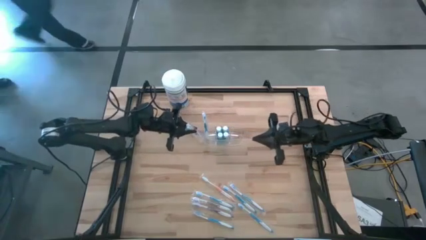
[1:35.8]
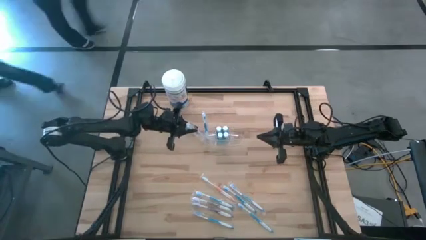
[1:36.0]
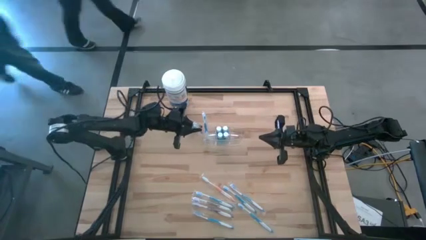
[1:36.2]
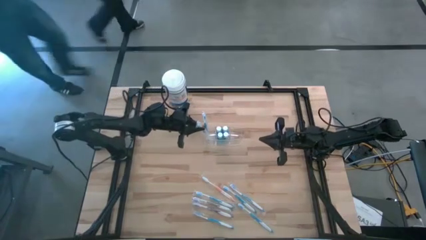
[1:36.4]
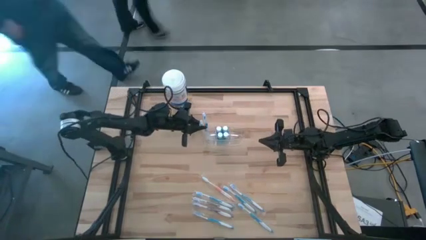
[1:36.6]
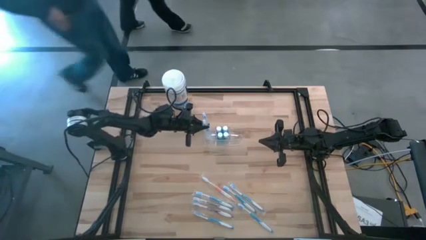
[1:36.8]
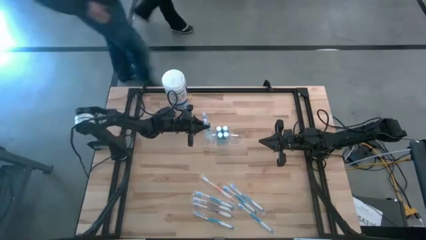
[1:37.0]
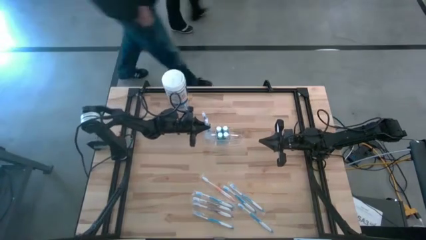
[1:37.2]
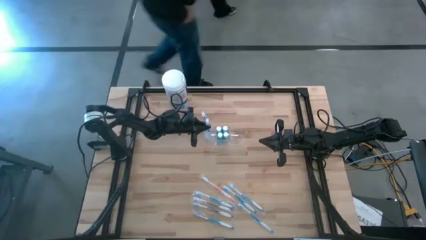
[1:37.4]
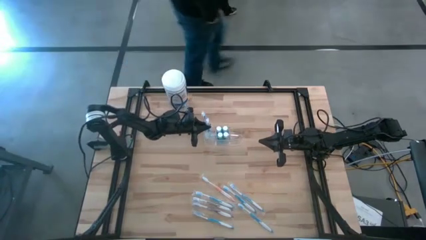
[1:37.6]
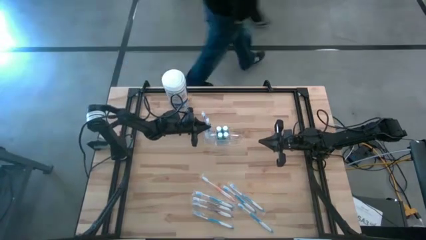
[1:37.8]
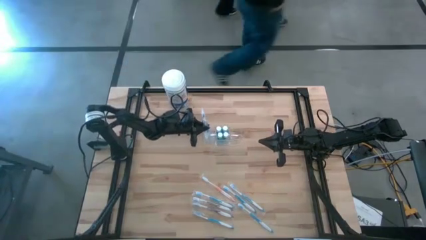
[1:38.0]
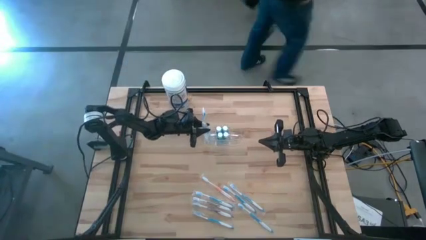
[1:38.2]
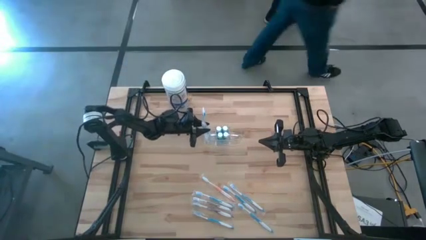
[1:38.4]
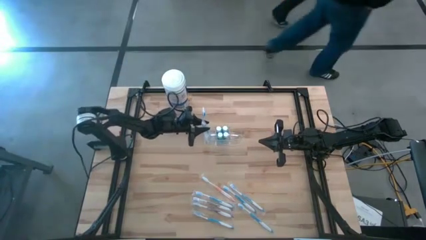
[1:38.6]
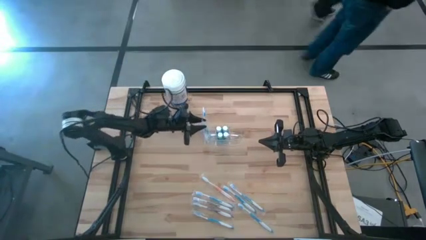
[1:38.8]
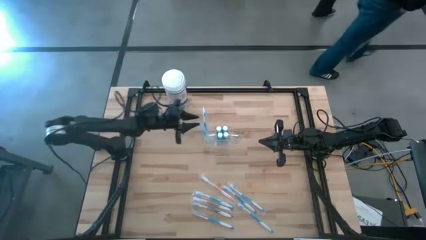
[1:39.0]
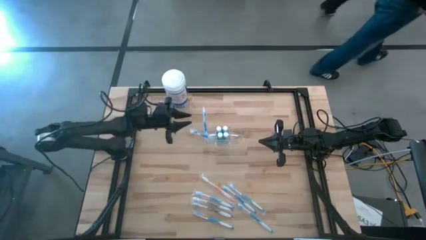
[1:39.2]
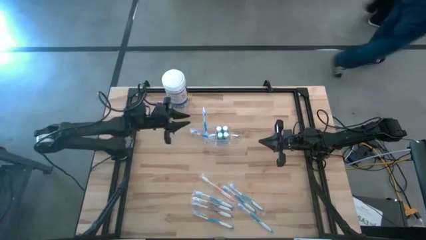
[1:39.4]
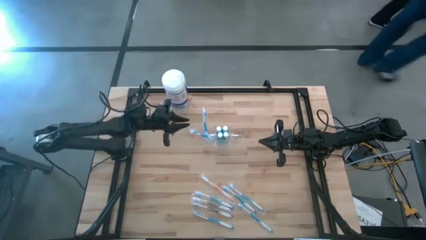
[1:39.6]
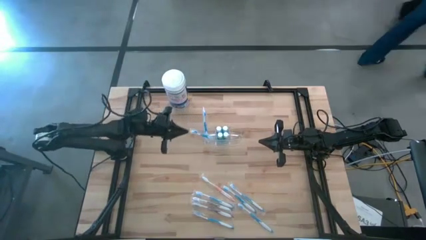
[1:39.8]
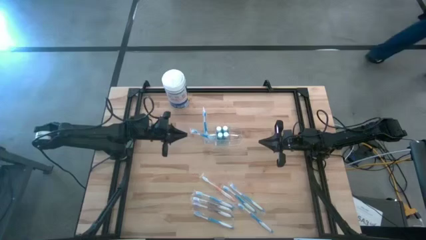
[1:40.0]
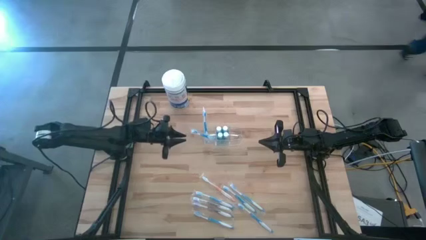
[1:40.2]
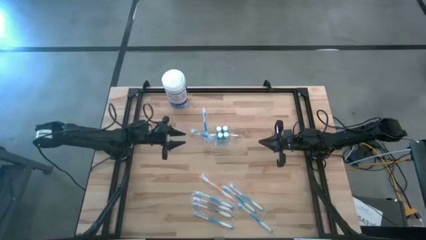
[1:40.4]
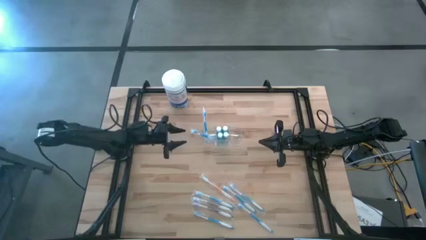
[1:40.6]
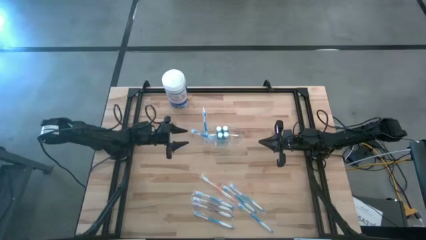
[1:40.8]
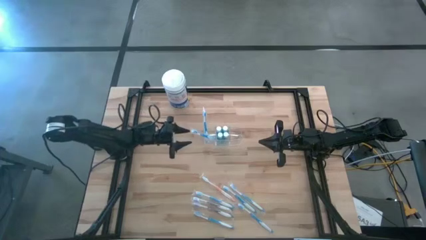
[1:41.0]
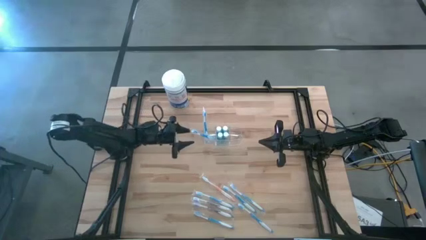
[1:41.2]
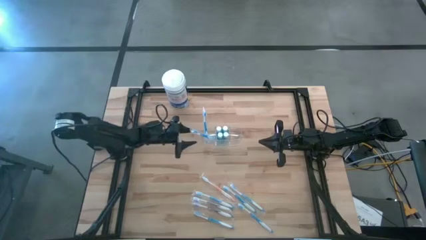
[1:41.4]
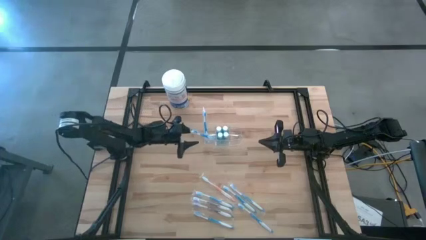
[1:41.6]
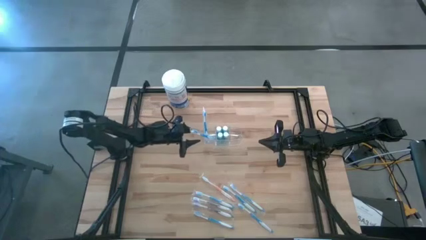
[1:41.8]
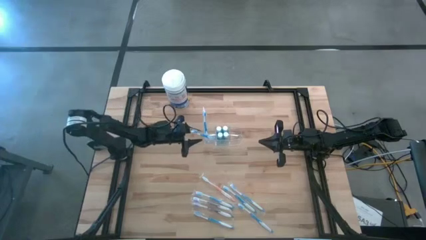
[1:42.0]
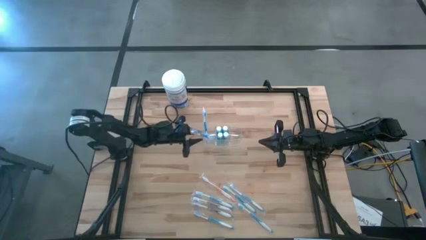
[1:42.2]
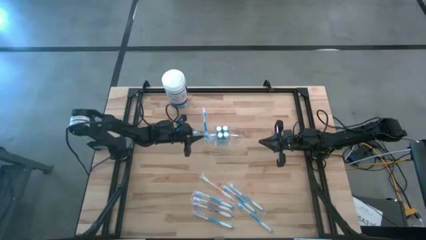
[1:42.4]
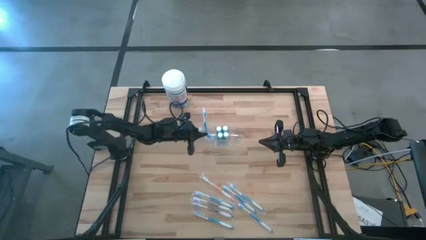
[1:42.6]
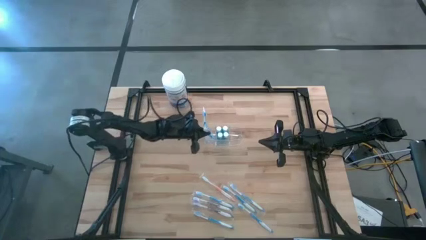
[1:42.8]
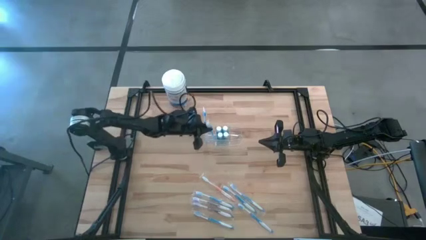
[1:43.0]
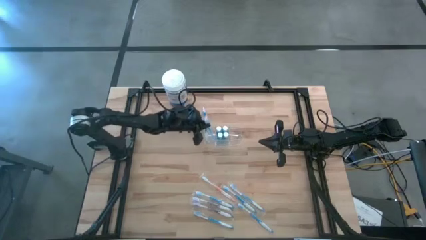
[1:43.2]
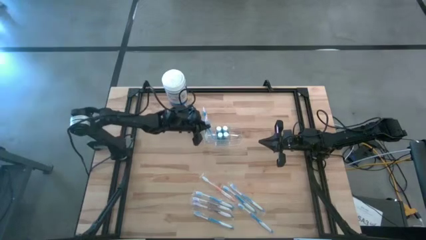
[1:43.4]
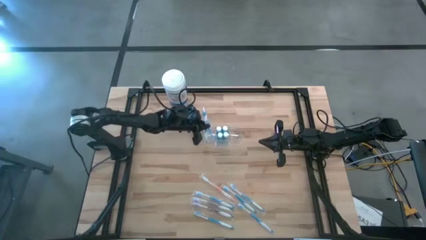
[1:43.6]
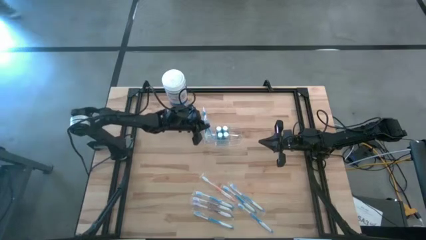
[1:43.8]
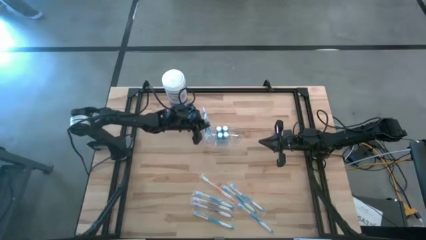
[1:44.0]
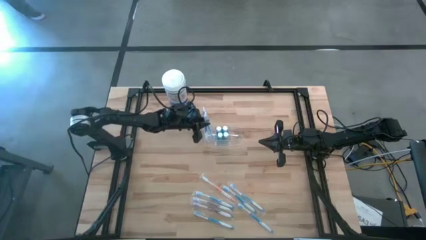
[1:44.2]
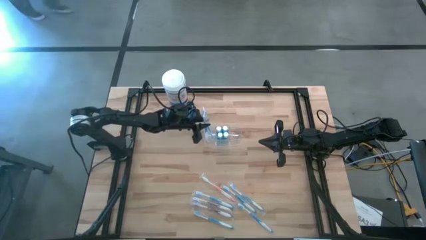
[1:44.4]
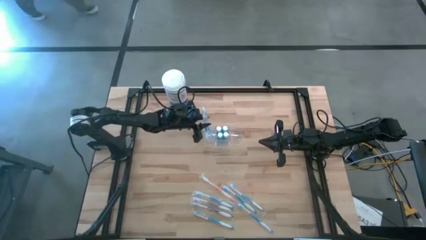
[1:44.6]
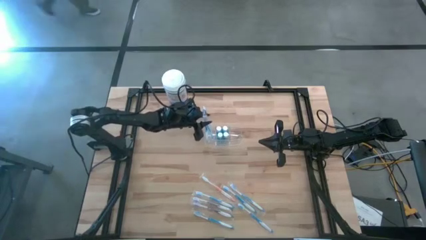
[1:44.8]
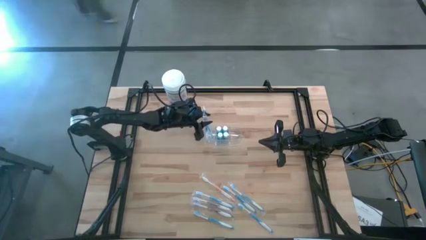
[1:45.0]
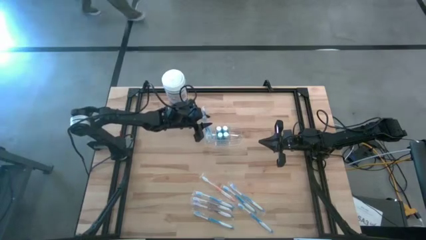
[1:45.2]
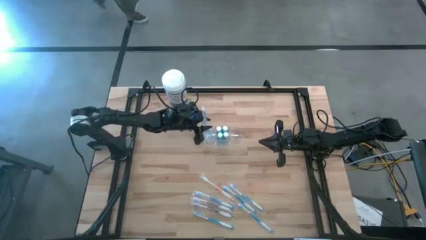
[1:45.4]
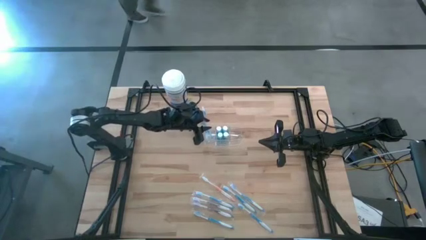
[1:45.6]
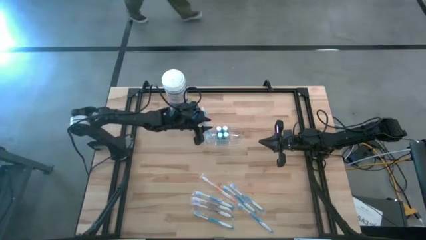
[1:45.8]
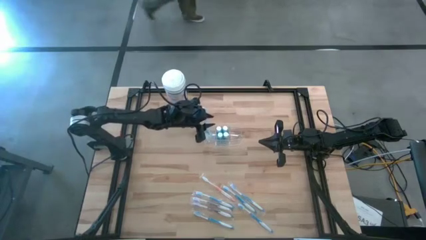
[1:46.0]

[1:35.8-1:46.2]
Task: Pick & Place toothbrushing station
Put the blue toothbrush in the transparent organizer

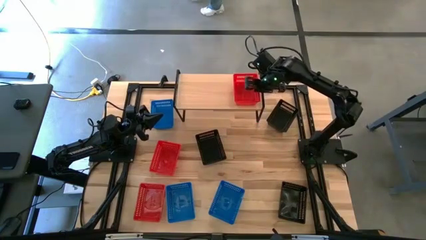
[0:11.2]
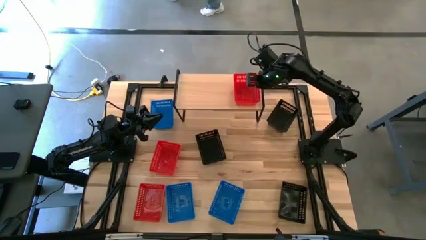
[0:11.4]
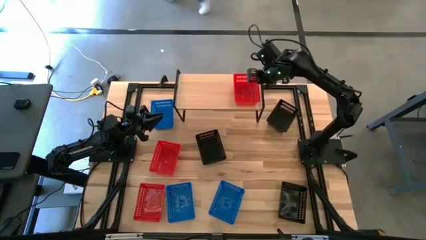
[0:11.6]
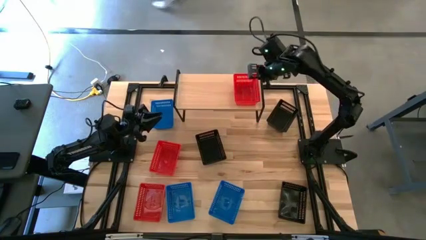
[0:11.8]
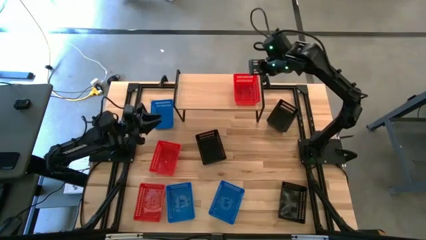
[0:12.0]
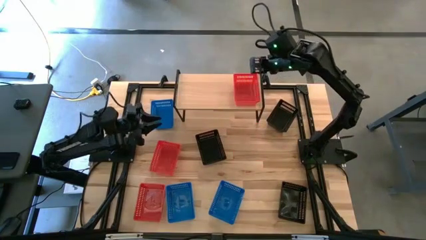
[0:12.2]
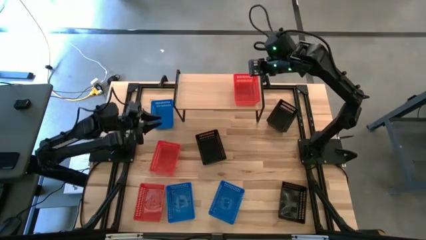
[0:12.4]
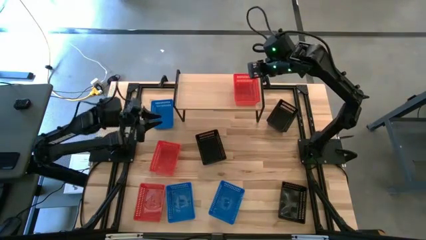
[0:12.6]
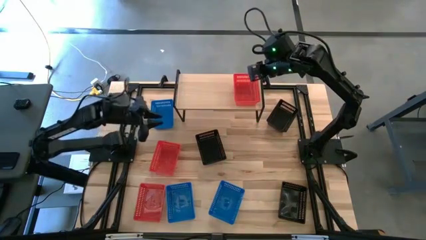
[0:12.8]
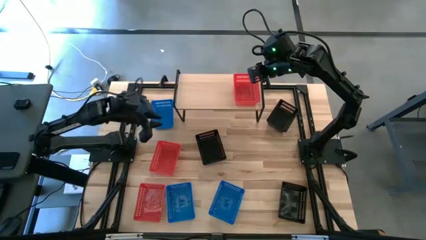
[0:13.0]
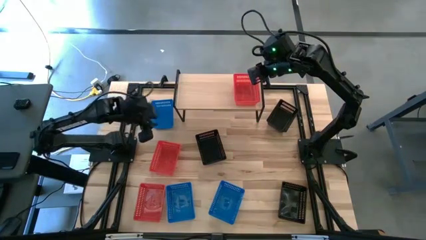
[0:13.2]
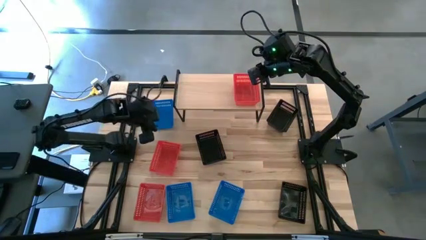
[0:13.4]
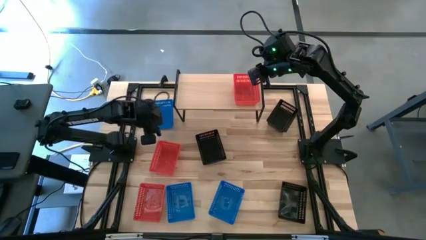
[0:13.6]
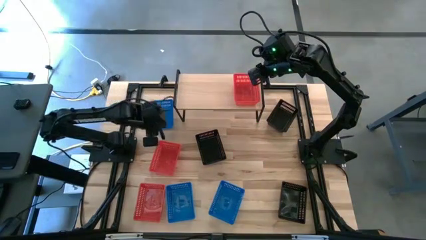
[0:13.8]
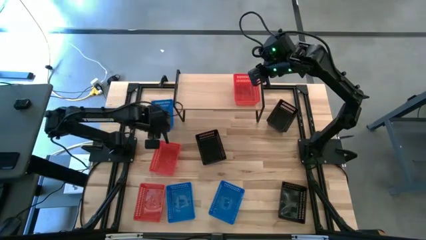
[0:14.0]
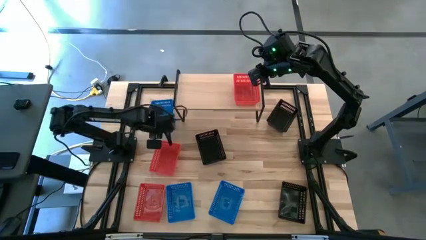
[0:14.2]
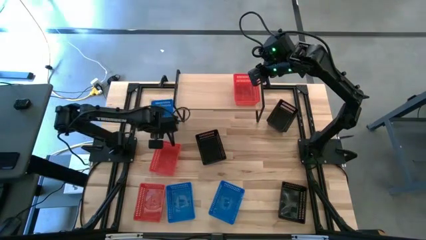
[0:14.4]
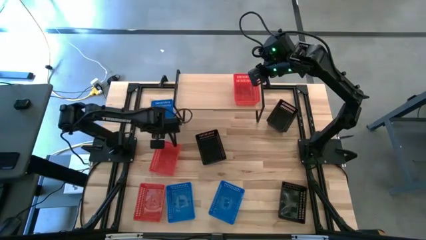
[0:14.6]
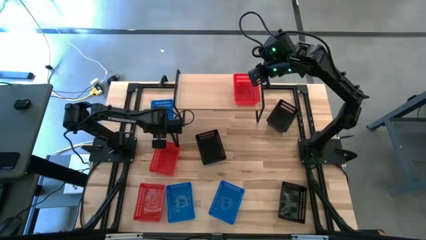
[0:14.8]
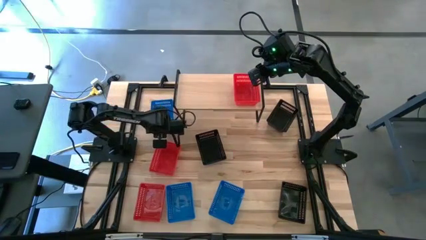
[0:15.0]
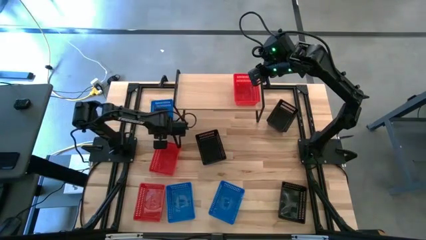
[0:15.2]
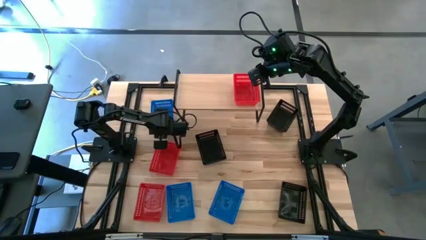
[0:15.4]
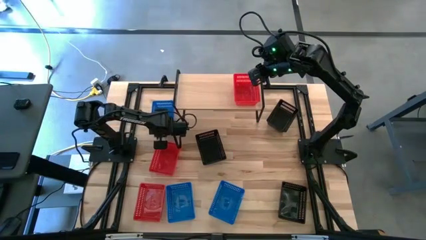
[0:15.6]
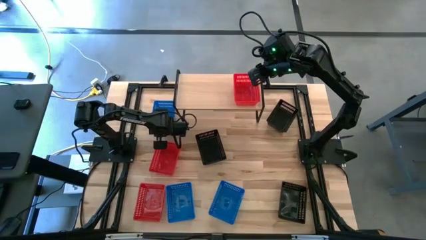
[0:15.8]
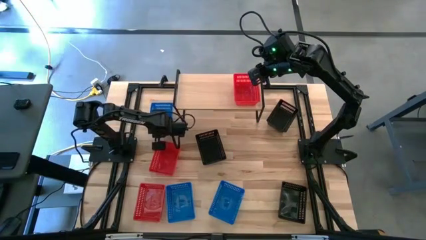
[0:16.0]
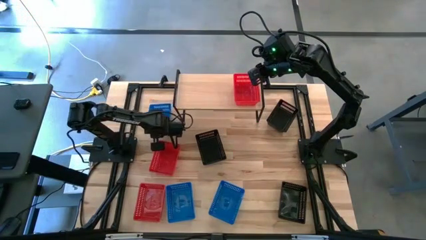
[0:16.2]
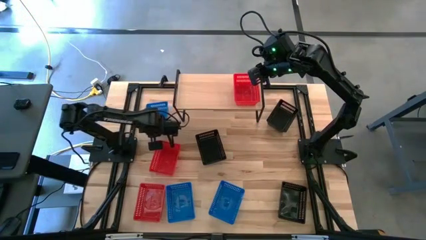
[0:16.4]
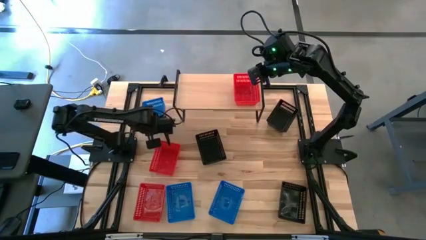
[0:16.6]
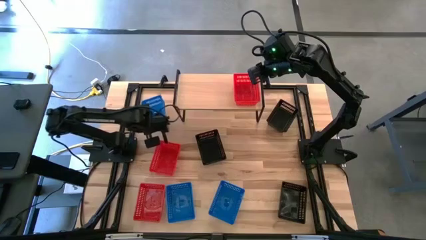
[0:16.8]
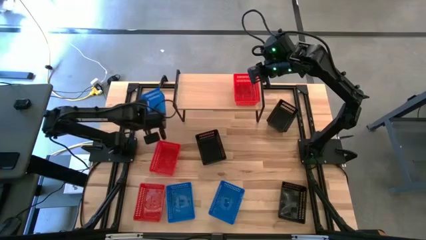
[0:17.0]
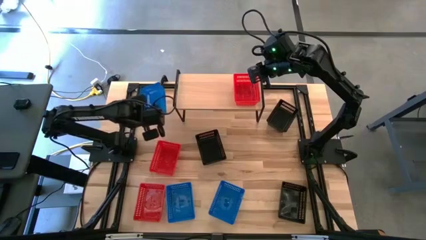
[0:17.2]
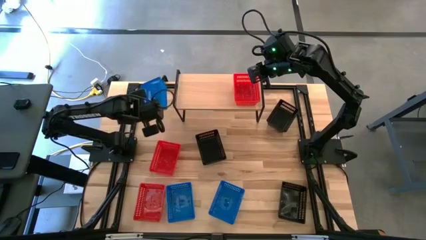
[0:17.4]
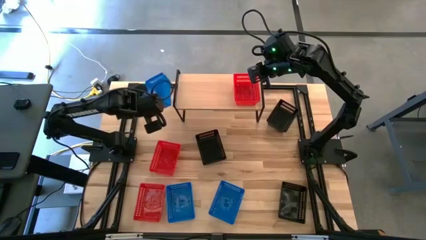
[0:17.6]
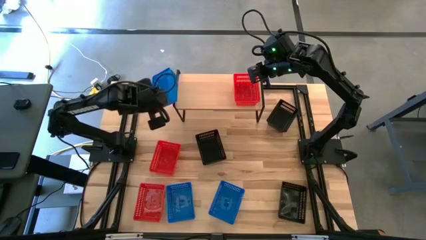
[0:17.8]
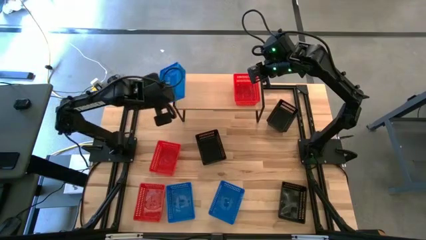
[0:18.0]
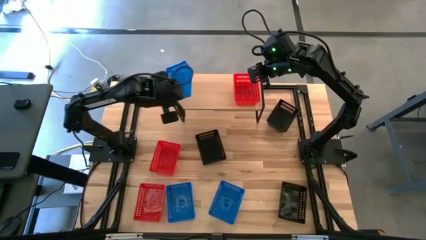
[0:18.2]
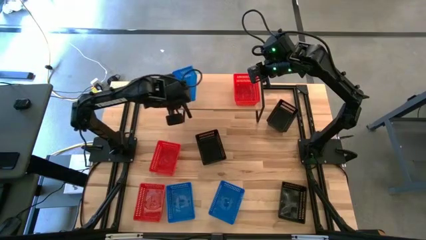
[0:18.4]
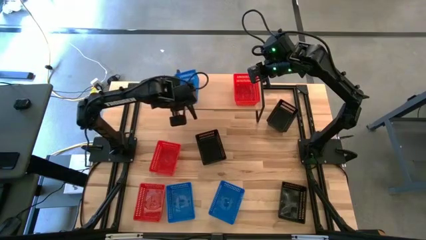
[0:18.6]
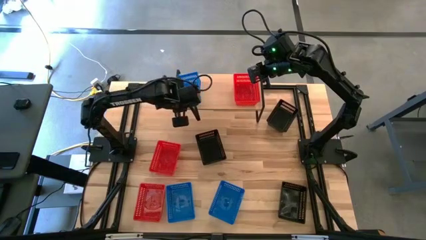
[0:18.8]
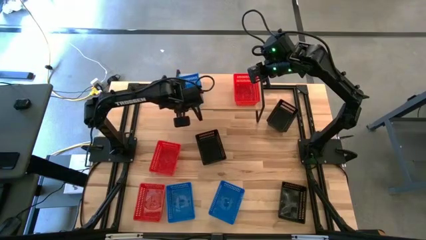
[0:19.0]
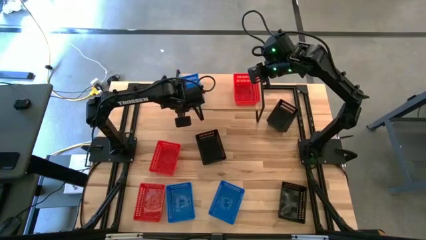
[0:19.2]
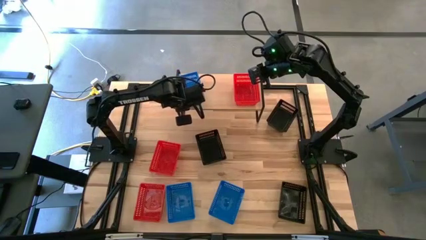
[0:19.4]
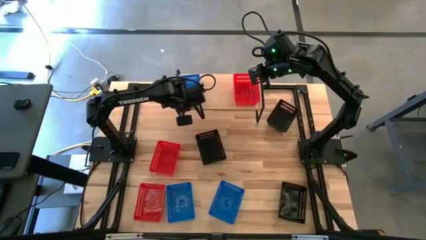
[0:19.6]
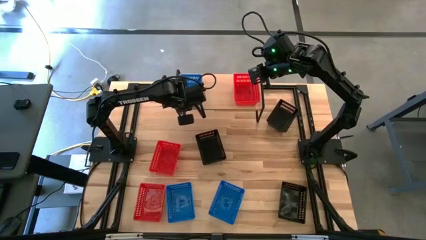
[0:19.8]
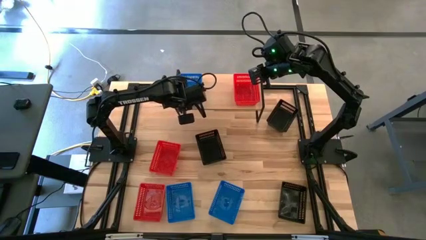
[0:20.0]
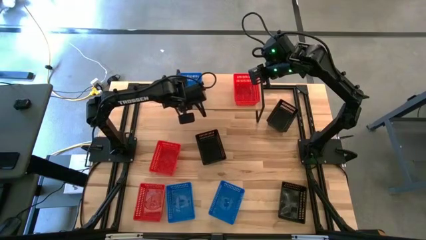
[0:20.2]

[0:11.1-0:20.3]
Task: Stack baskets on shelf by color
Put the top blue bin on the shelf
